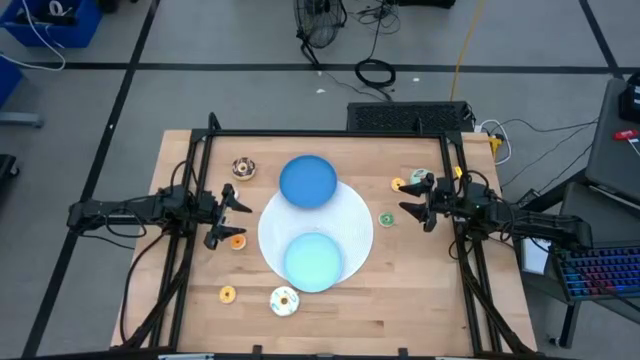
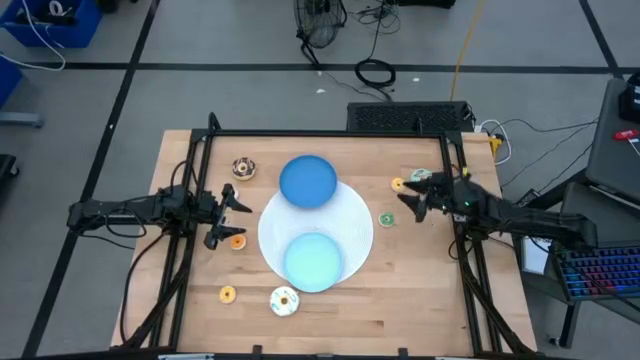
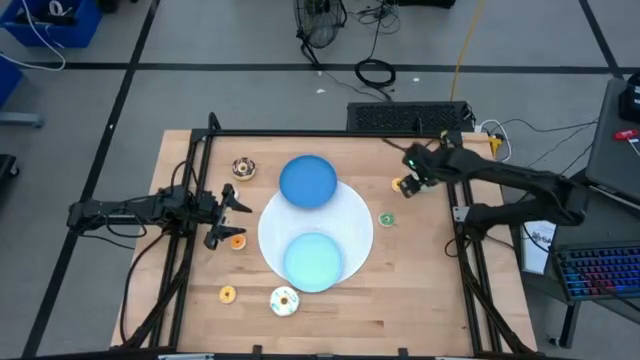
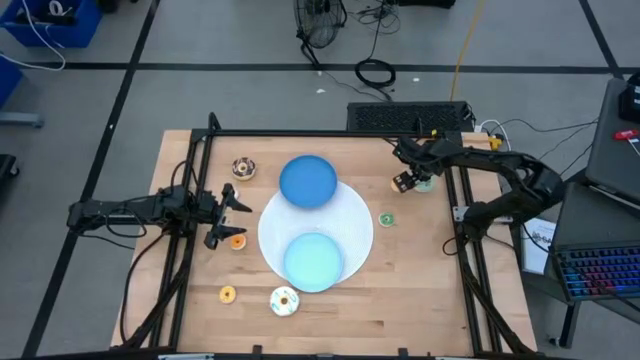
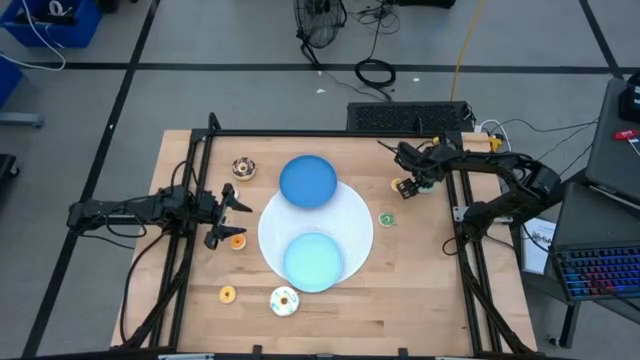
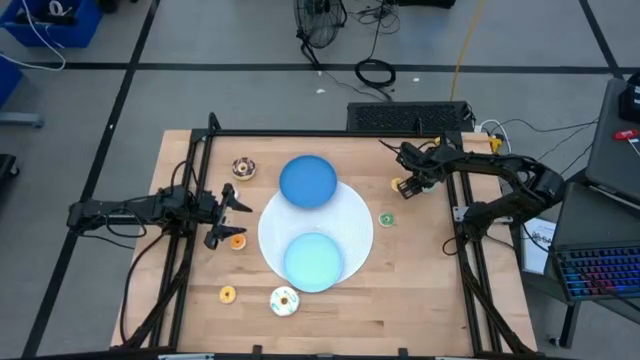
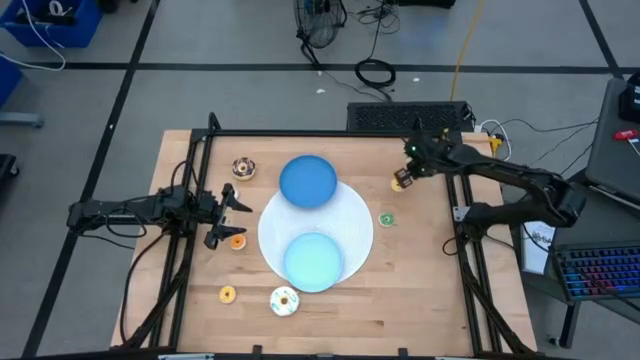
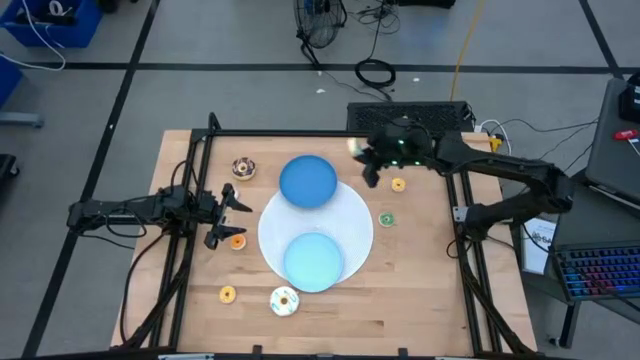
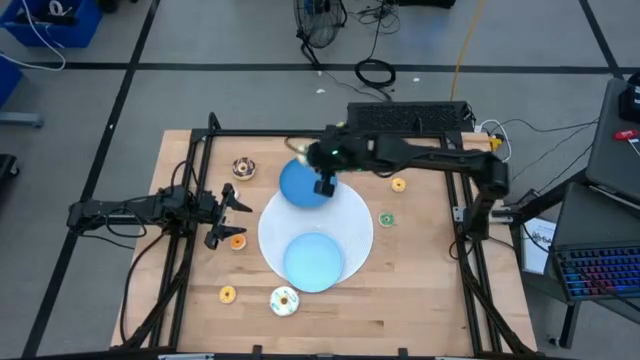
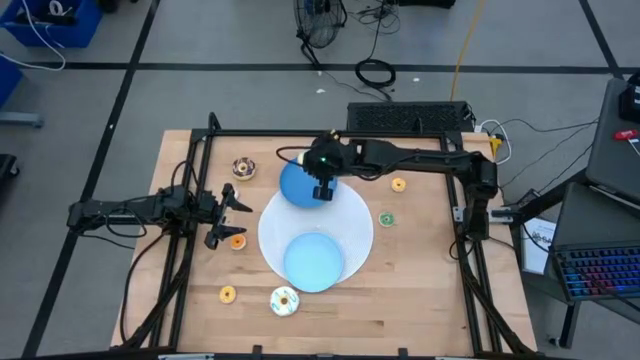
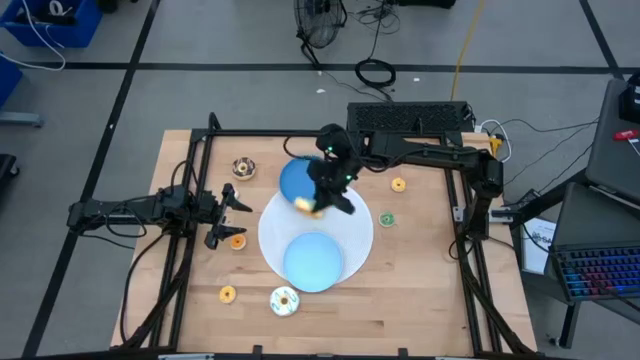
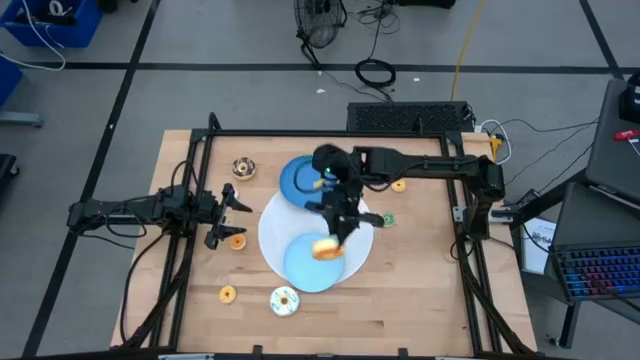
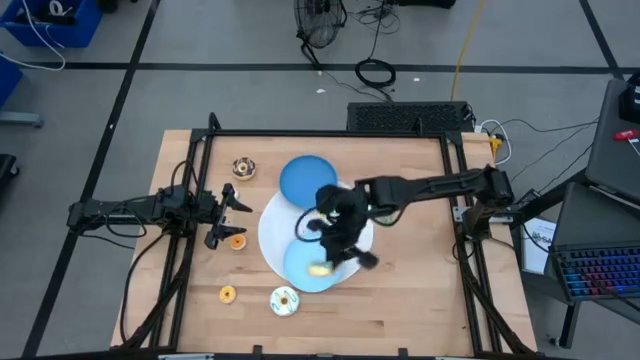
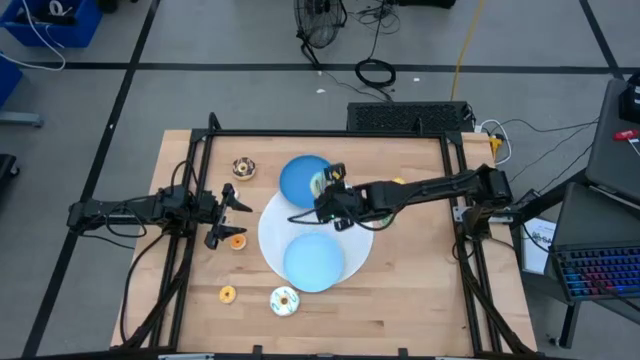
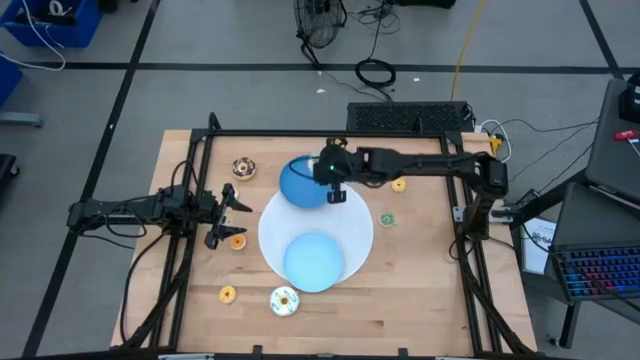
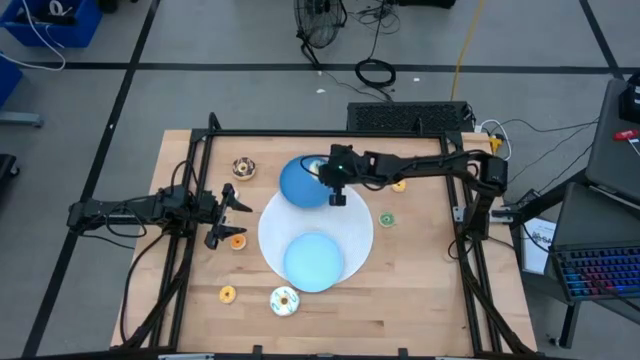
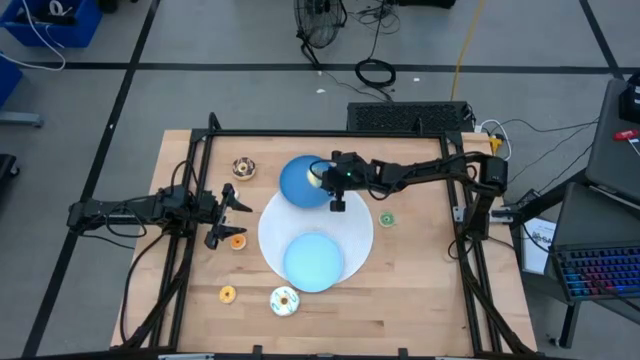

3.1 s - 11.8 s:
Task: Pick & Place donuts
Put the large light blue donut on the blue plate

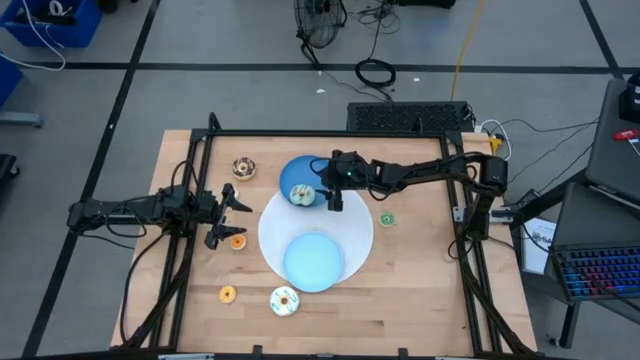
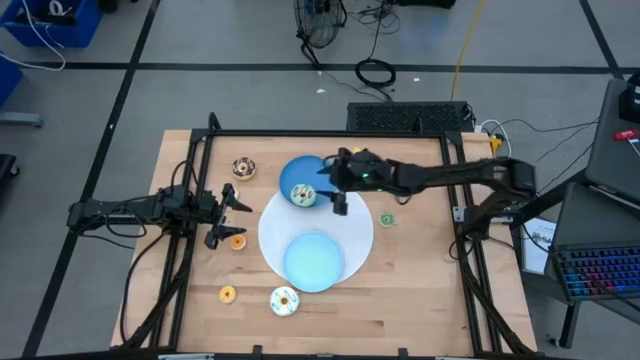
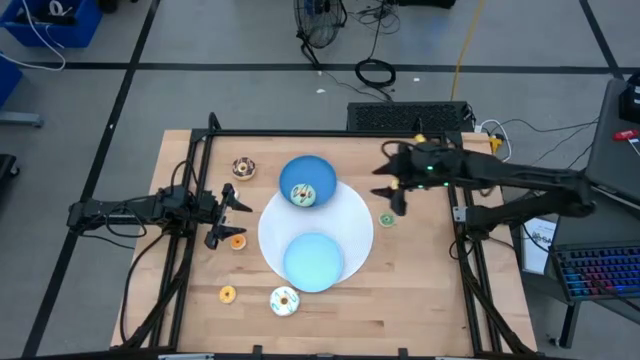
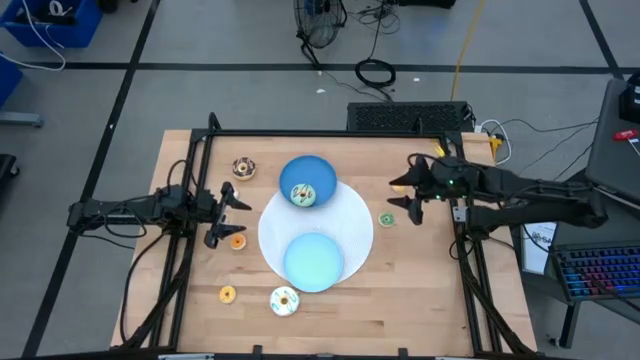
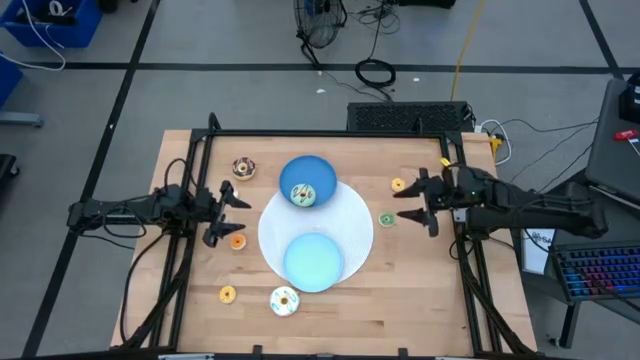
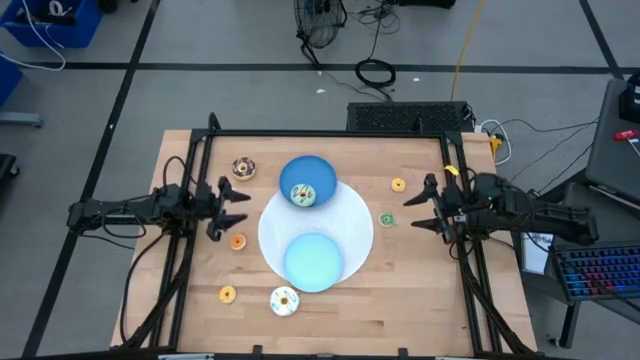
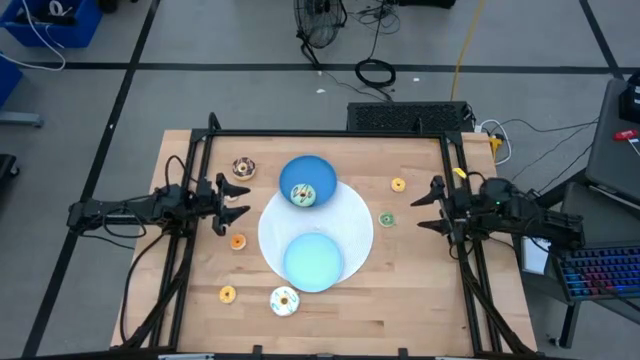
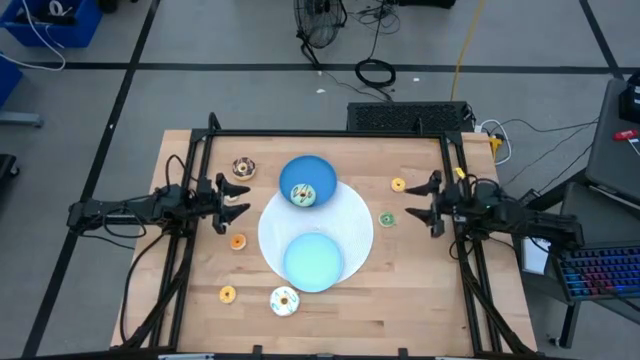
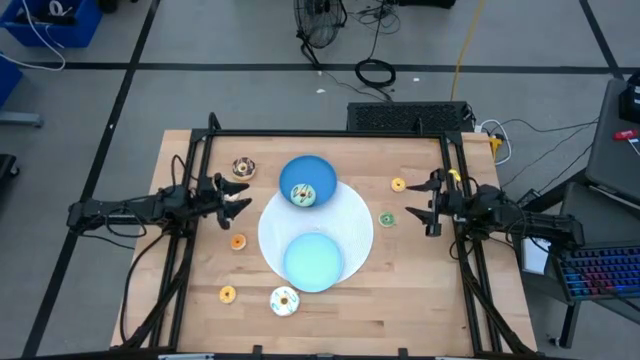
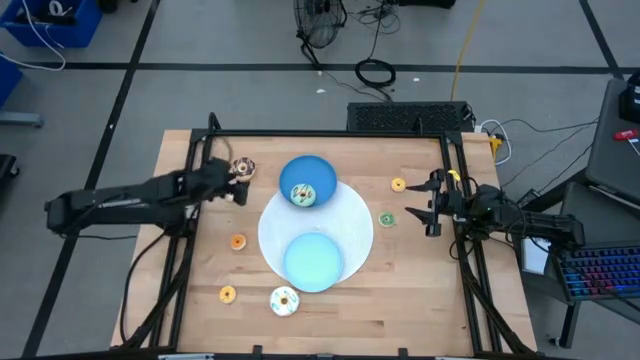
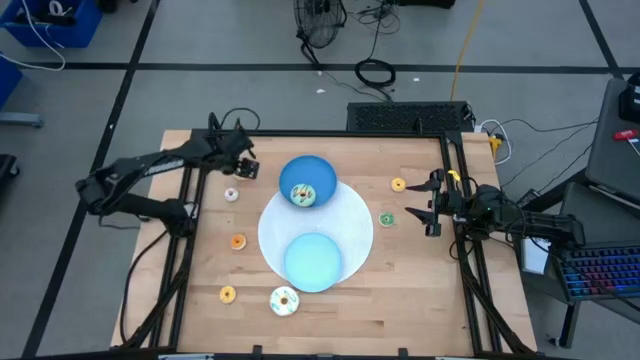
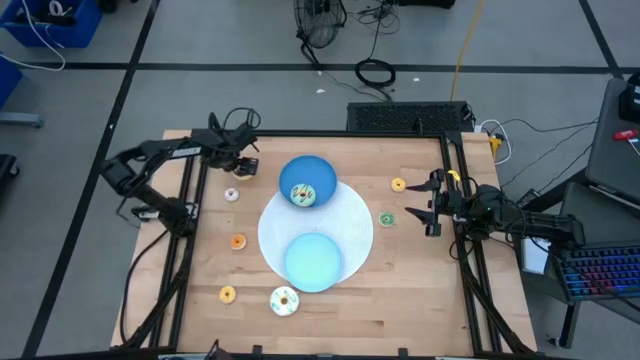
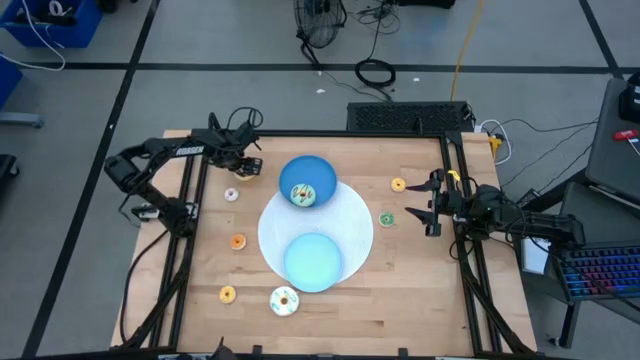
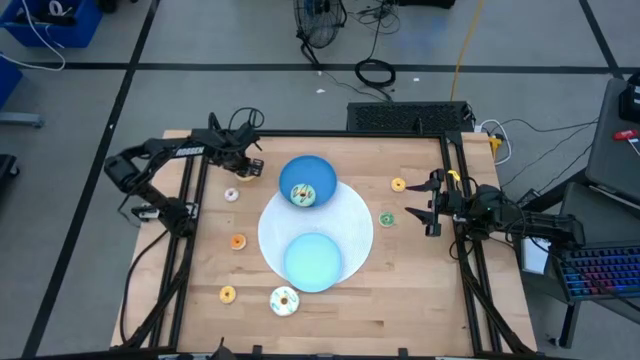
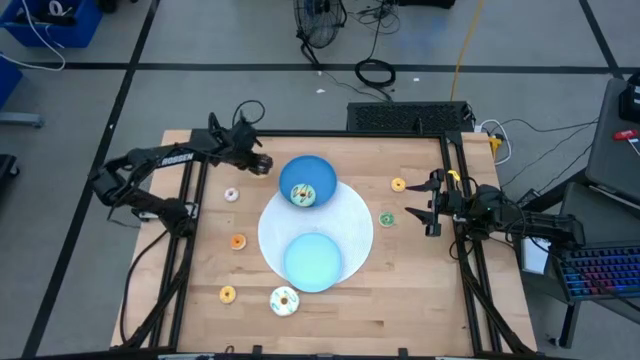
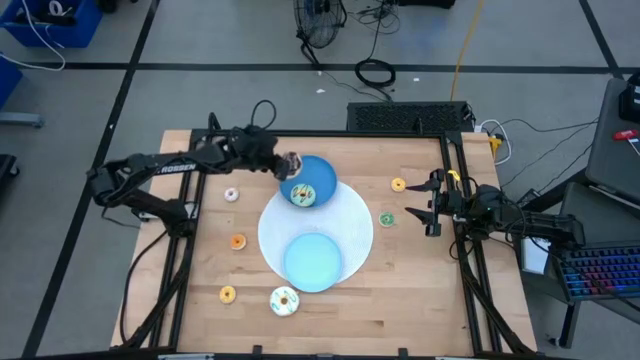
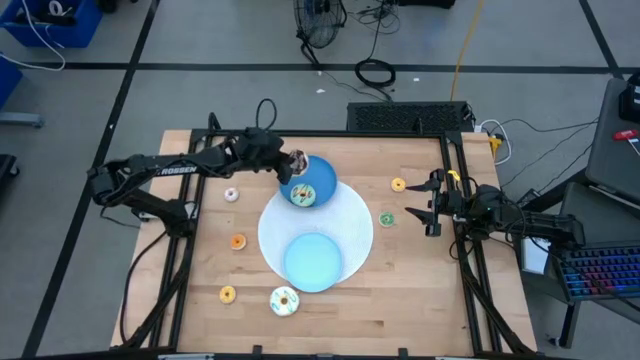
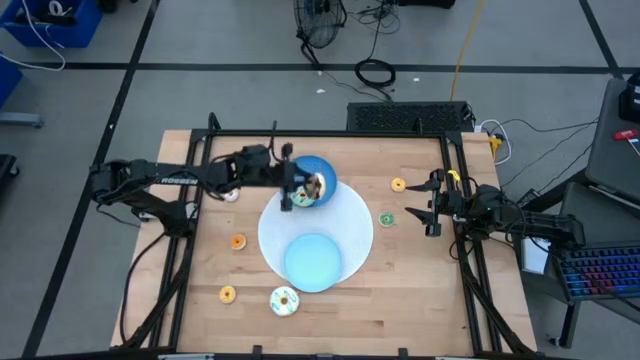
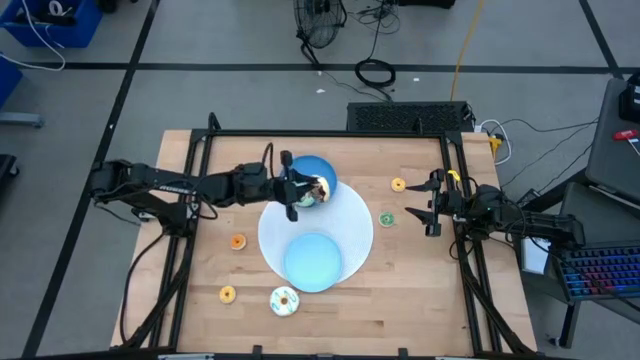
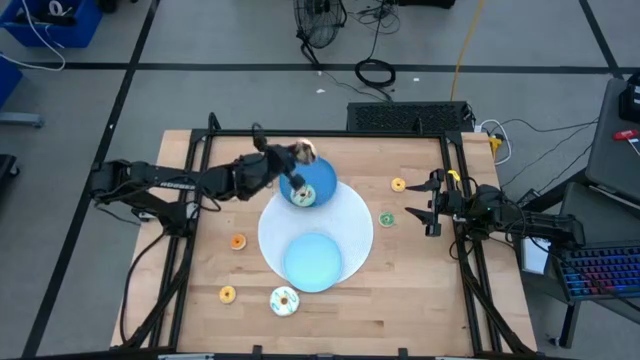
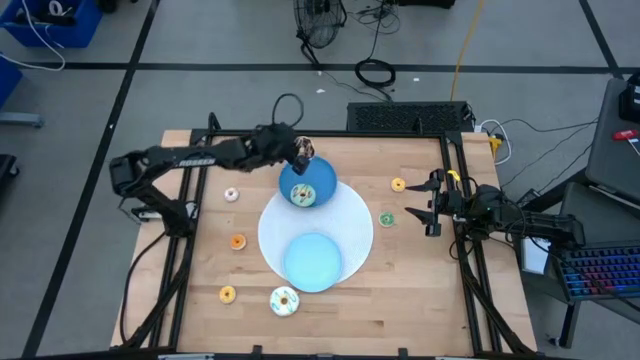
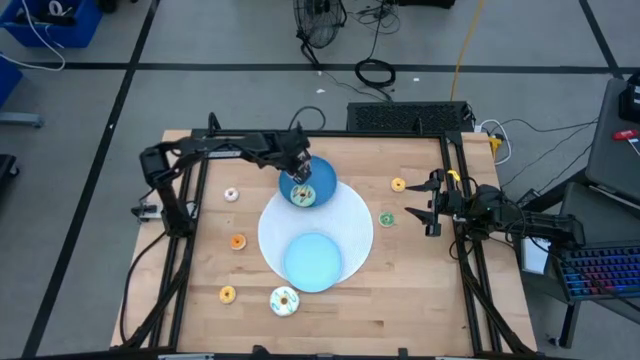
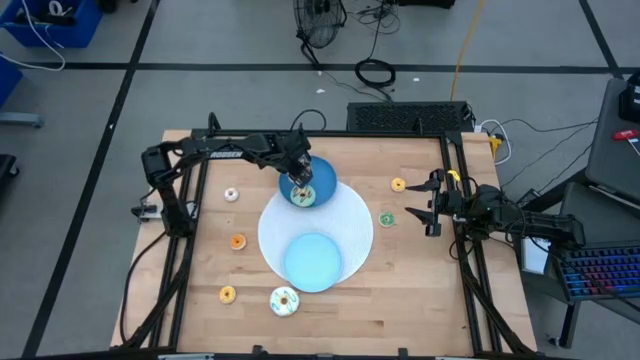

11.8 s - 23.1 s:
Put the large black donut on the blue plate

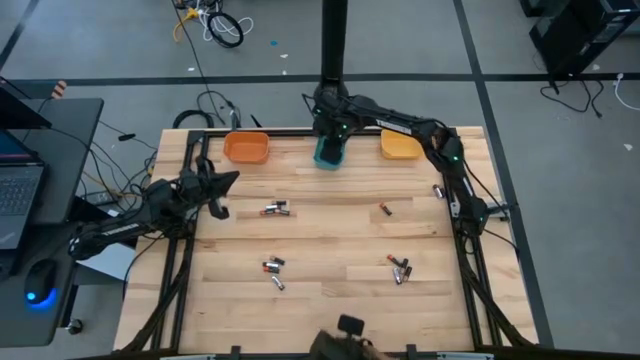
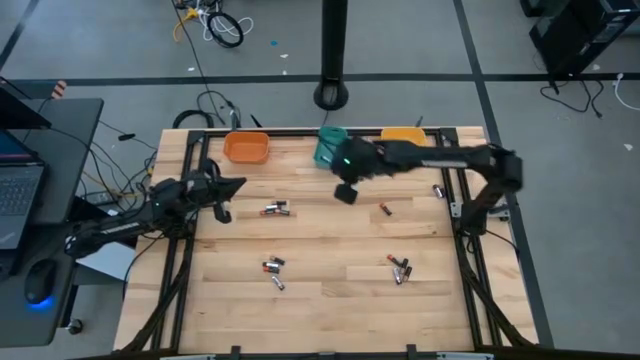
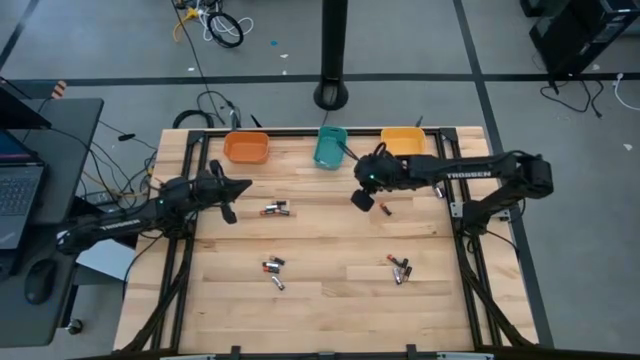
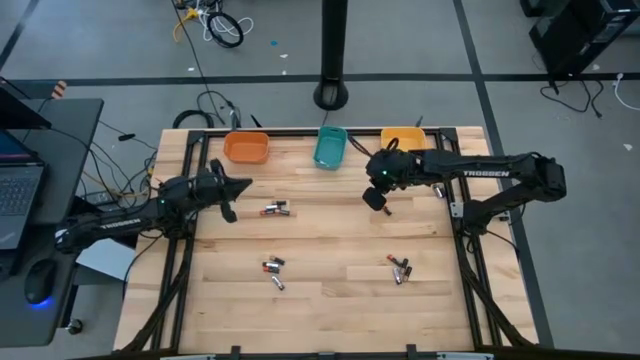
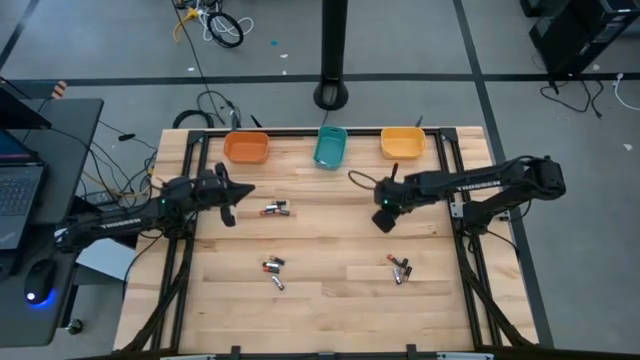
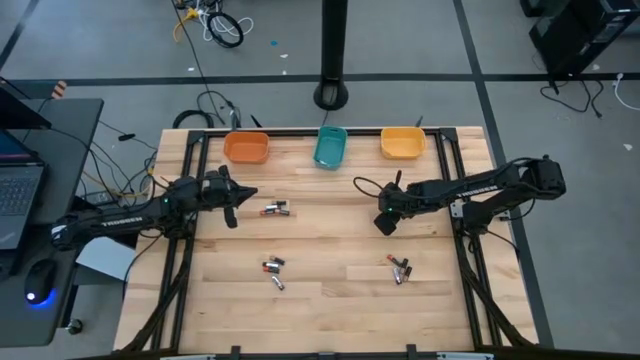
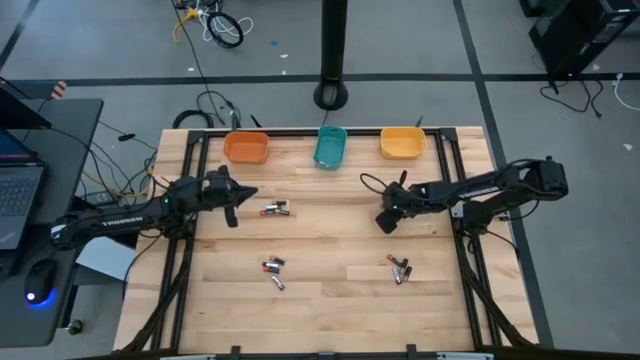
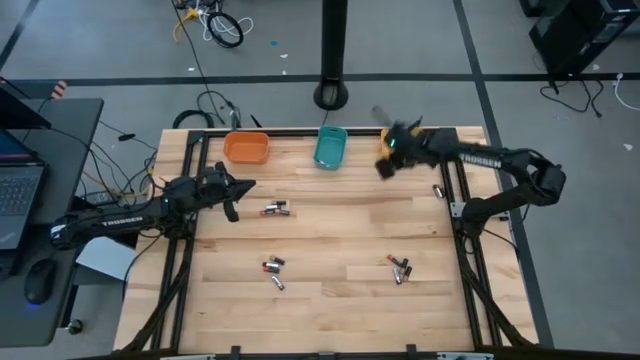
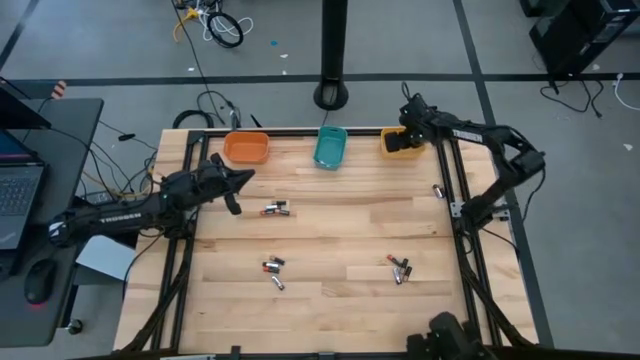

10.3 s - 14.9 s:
Task: Sort batteries
Put the red-black battery into the yellow bin
